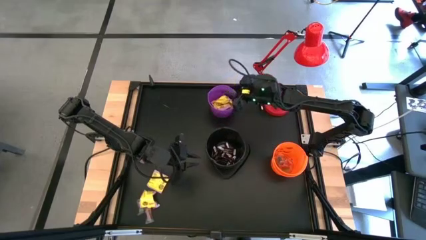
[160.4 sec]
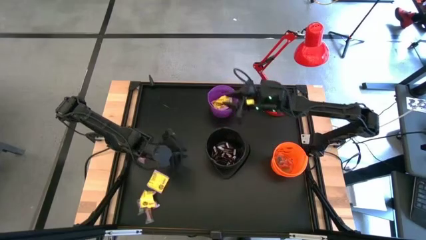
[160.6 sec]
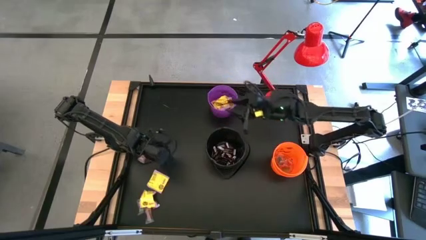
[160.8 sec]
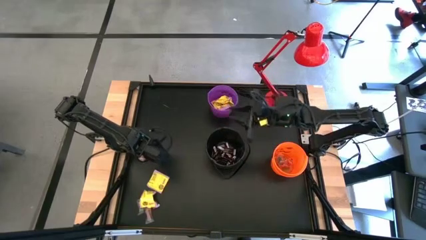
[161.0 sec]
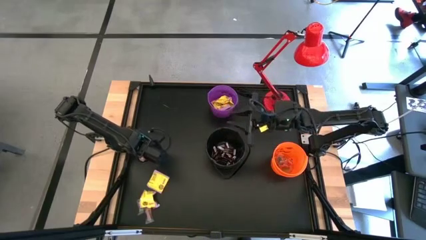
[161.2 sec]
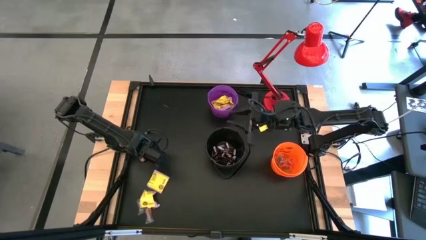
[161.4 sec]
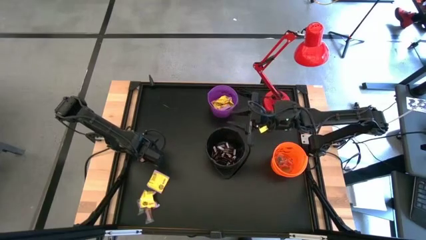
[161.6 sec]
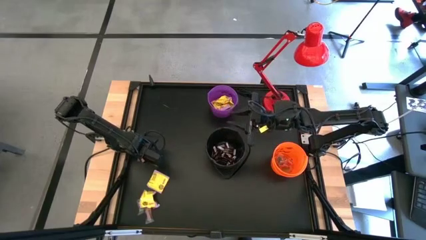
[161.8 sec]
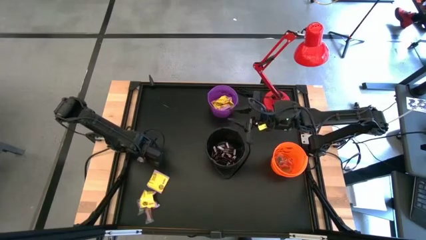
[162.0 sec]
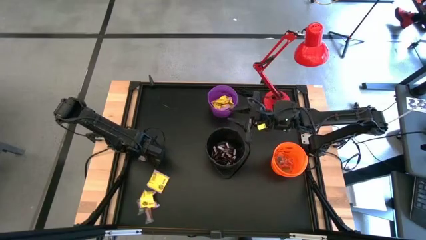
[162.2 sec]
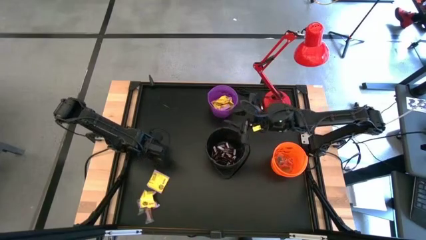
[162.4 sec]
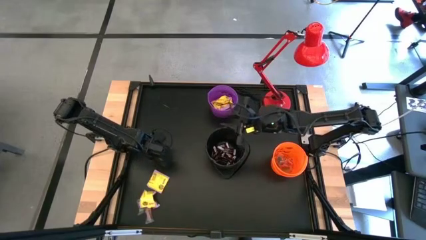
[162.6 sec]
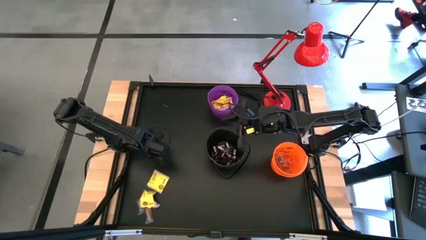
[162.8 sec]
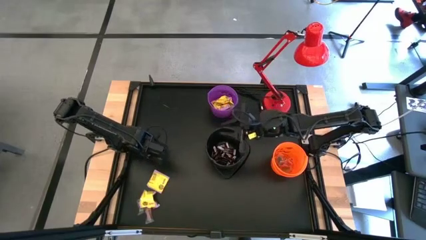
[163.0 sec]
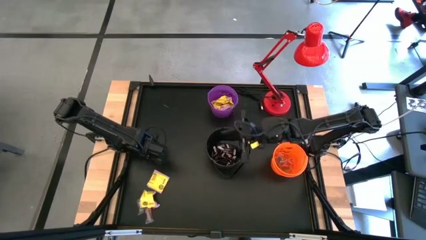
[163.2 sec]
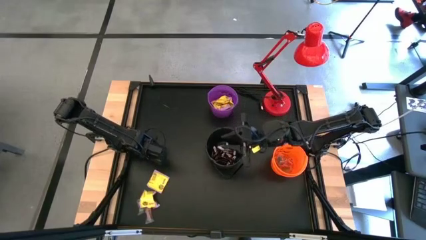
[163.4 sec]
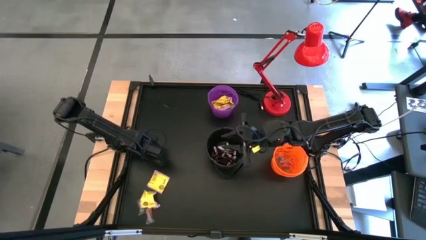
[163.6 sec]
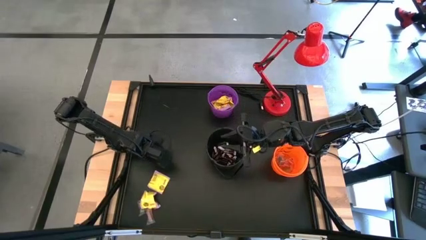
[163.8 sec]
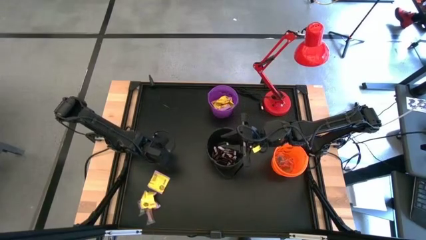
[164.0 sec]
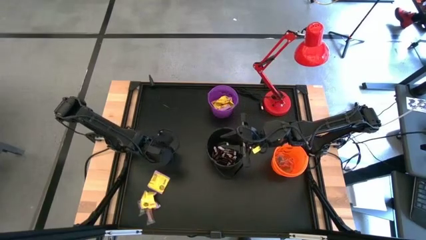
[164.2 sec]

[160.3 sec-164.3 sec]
Task: Sort candy
Put the orange gummy into the orange bucket

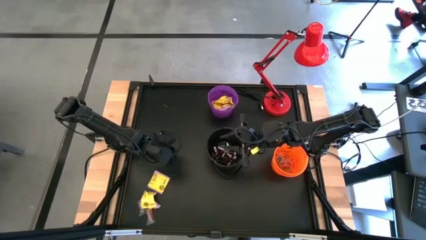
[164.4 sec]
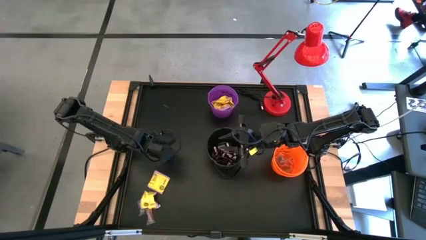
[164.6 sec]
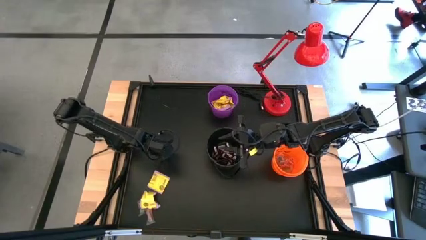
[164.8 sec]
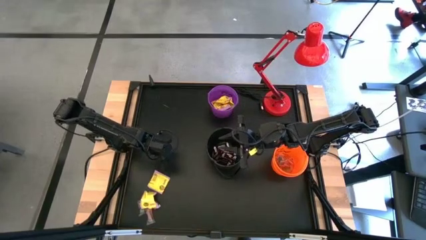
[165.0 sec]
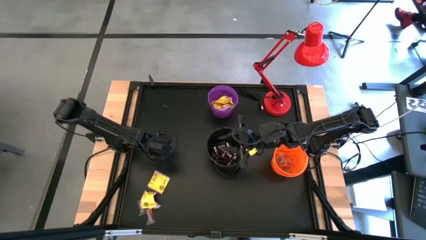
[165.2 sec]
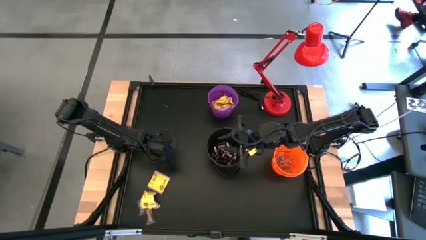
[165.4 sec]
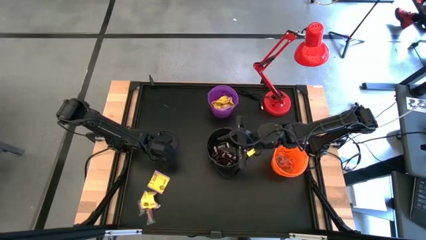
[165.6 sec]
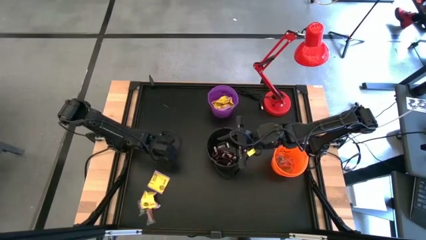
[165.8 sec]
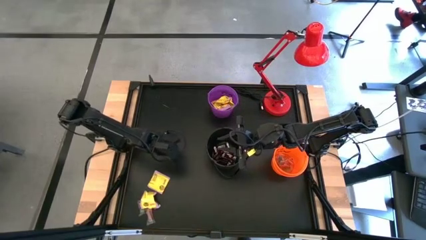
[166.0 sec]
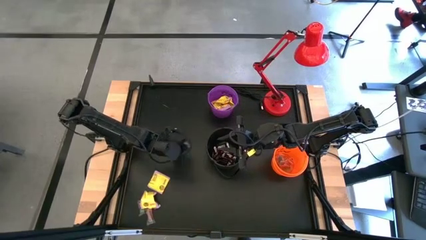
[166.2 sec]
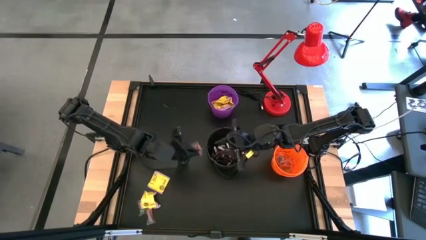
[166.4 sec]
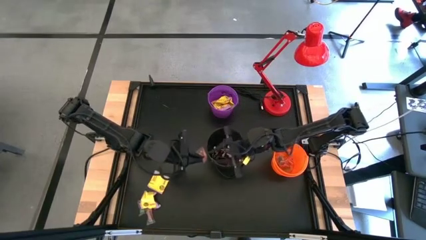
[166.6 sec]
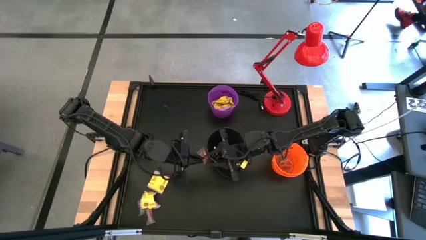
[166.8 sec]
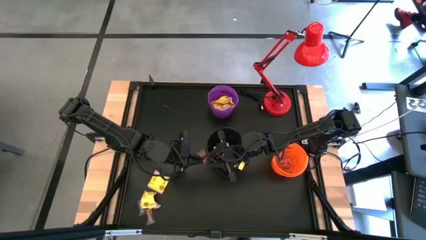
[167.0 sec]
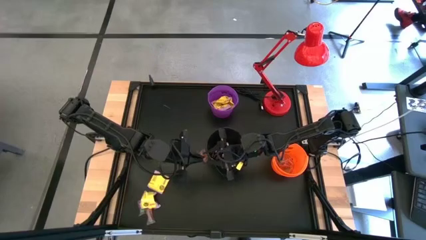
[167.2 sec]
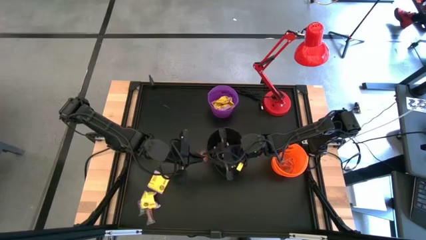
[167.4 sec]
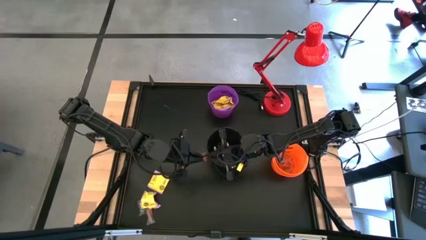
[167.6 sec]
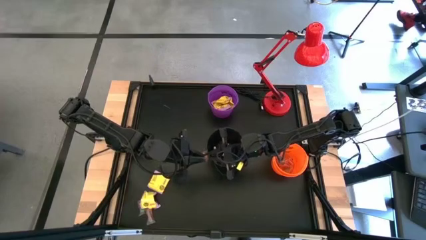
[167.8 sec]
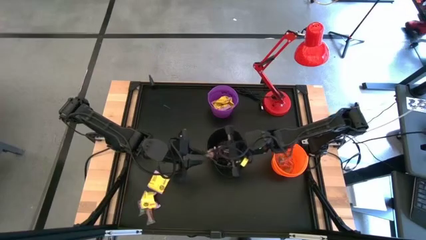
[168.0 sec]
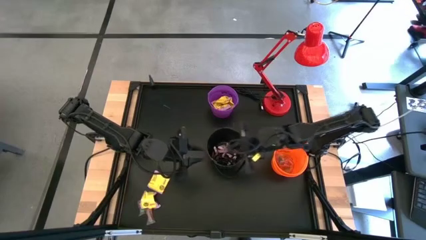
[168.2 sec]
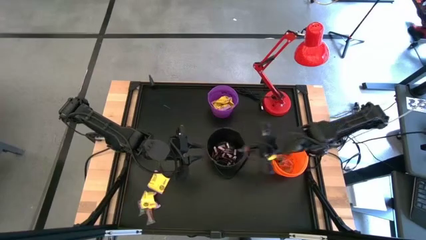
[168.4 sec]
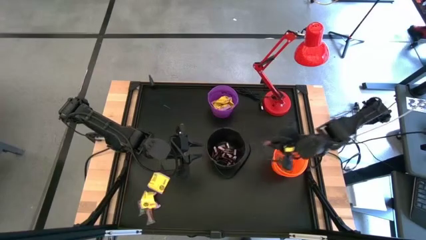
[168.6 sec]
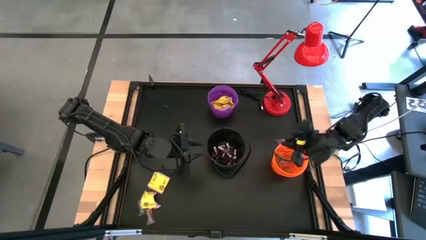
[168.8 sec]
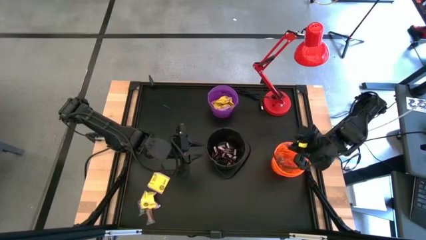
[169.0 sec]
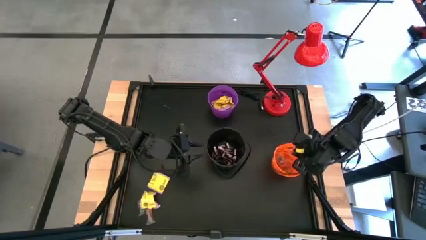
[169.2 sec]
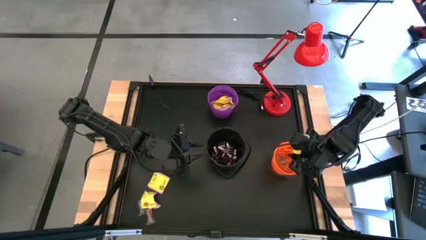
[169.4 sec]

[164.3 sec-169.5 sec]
Put the orange gummy into the orange bucket

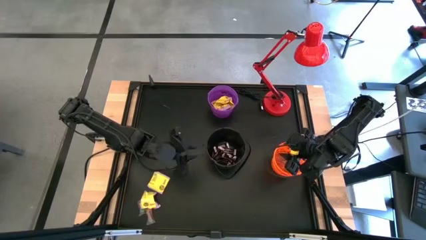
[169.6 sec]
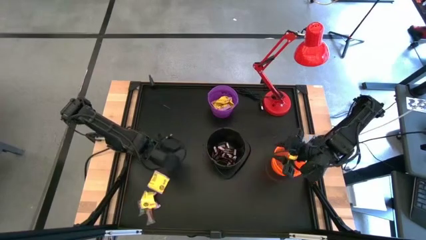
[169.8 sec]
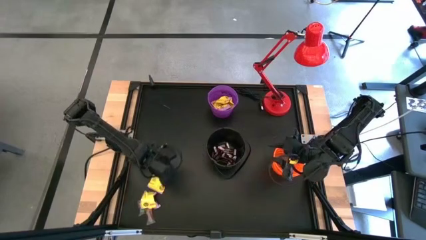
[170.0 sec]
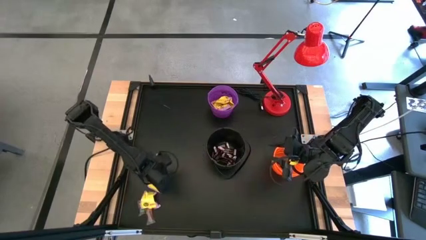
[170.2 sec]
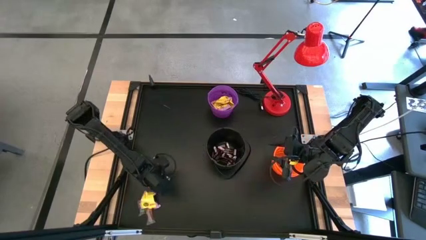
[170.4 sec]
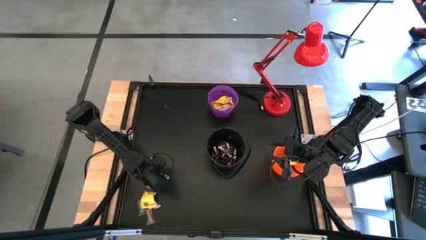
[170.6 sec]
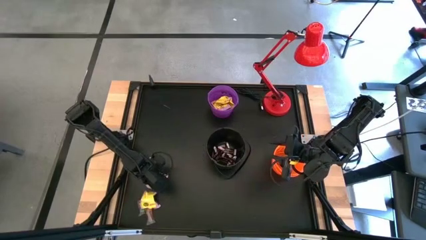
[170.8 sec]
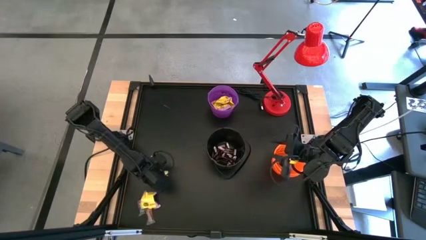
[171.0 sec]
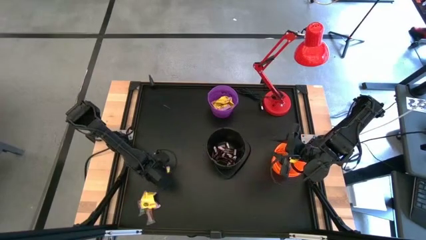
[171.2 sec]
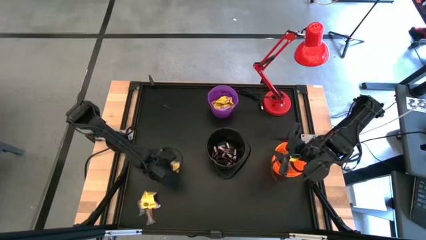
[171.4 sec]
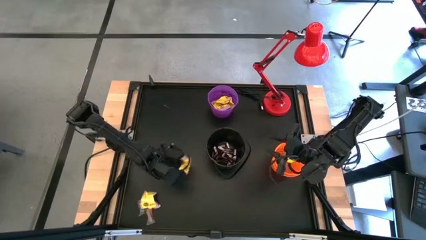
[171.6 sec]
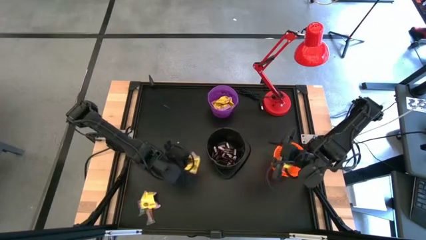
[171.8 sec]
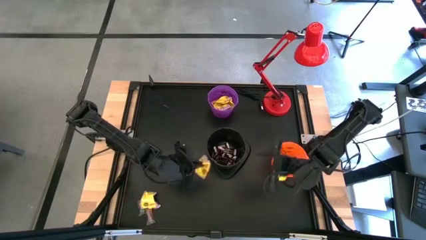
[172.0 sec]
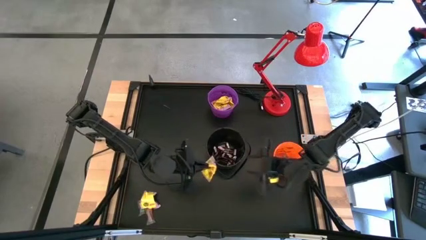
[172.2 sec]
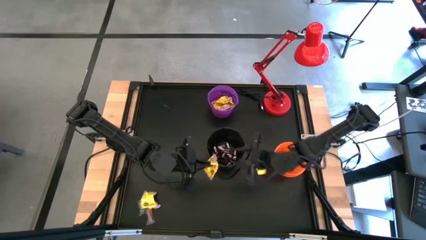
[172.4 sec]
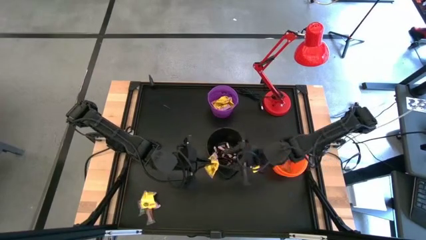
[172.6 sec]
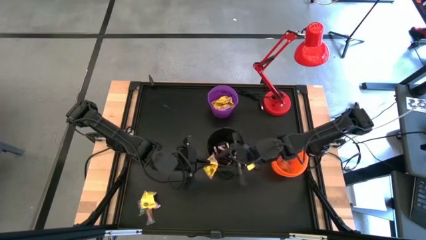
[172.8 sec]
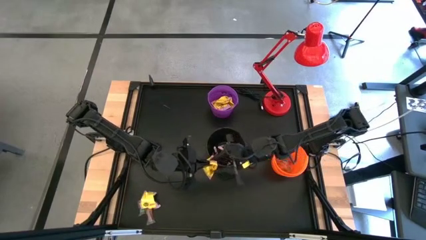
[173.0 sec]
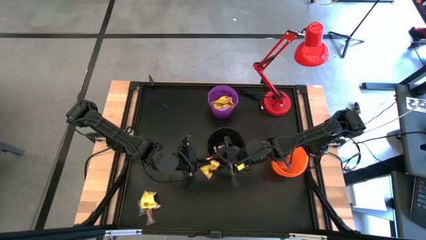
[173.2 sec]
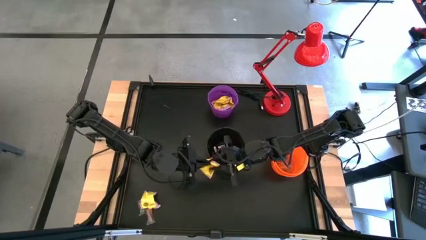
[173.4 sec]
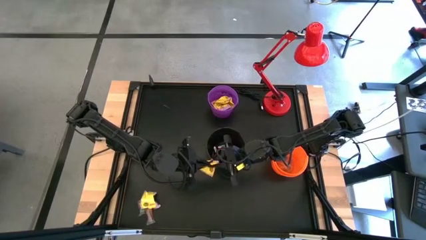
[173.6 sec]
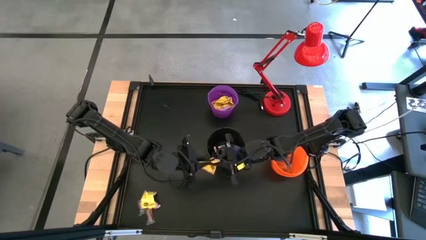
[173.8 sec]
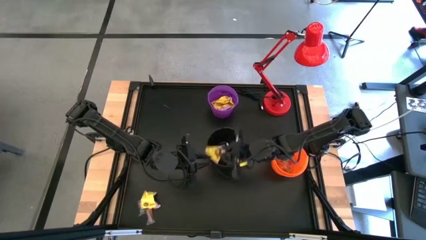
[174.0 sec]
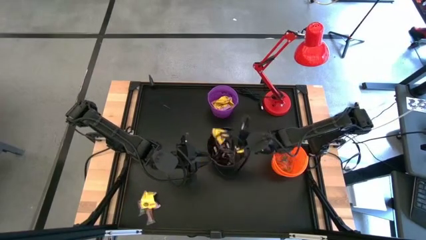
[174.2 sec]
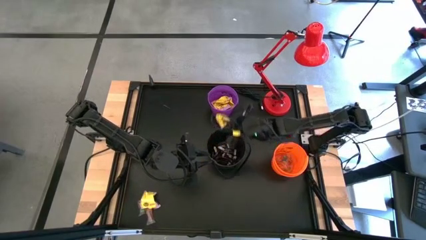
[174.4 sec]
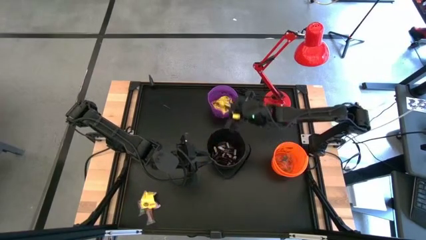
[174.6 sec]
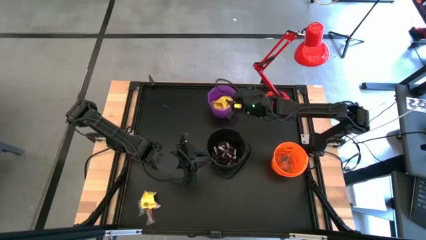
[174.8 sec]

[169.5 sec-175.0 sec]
Put the yellow candy into the purple bucket

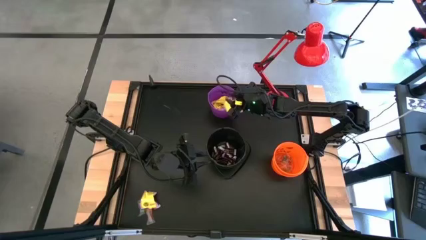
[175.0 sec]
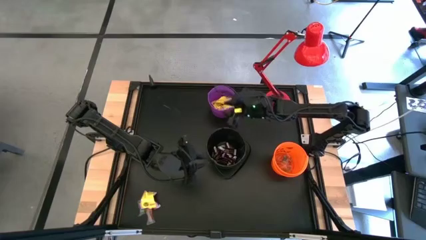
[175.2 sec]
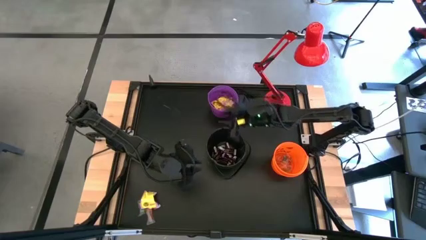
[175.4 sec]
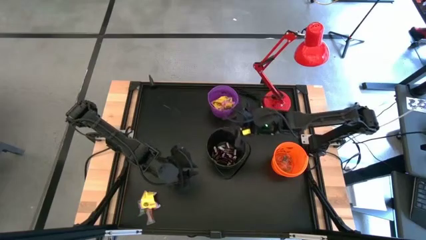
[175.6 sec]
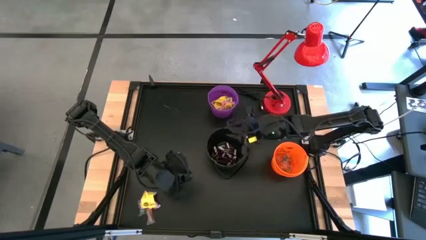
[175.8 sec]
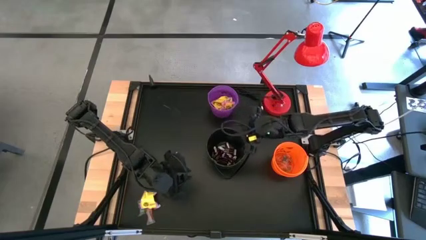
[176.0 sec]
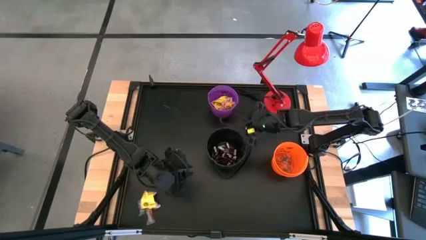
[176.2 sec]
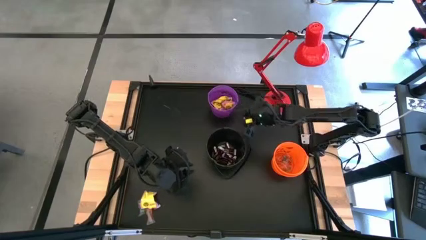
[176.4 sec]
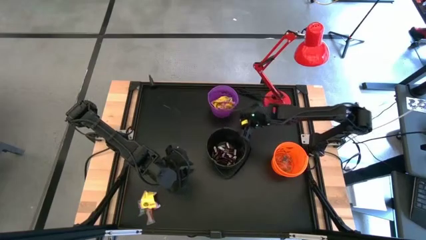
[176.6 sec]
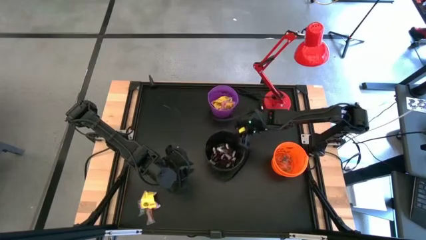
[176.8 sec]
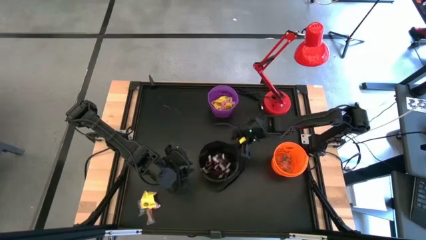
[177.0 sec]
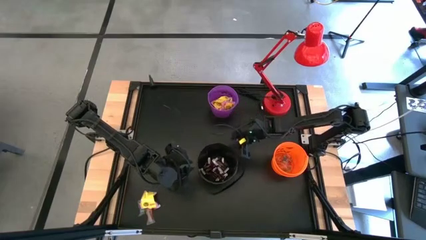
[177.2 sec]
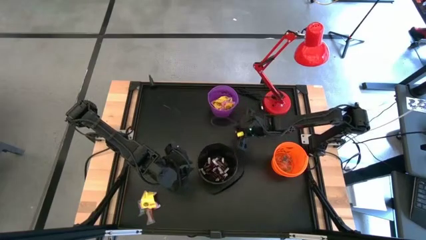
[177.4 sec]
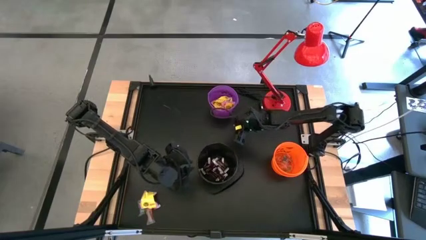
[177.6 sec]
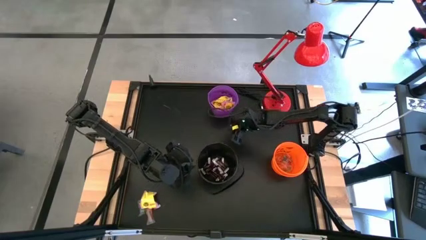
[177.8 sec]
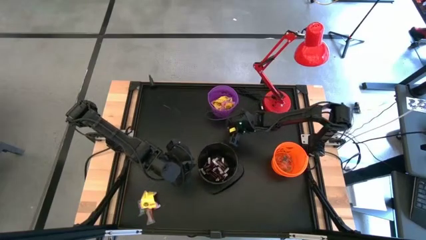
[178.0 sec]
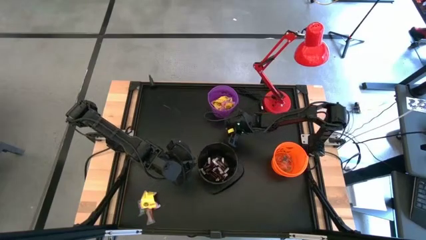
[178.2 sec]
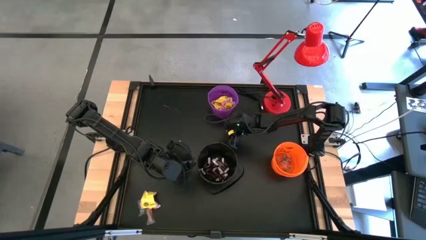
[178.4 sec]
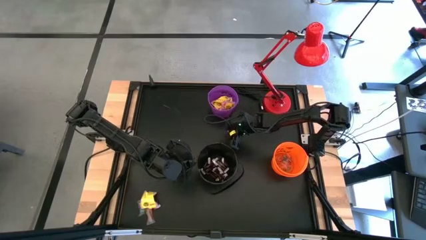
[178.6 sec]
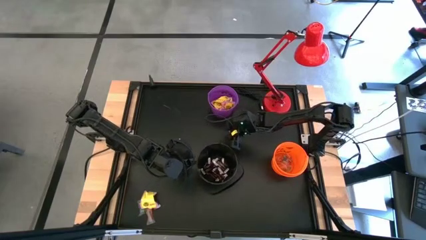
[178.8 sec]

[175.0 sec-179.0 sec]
Adjust the black bucket
